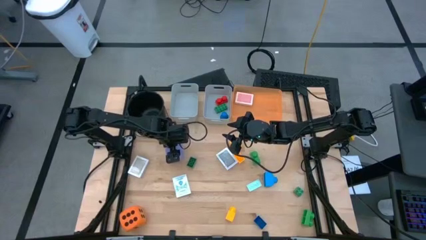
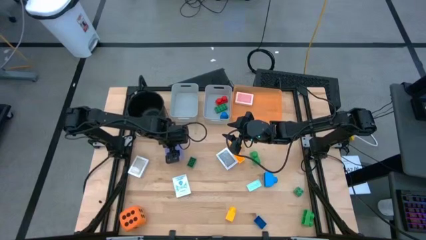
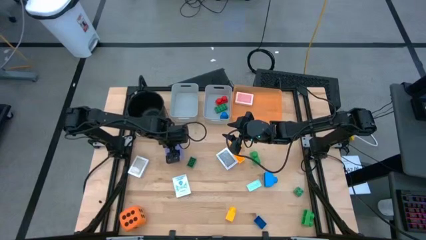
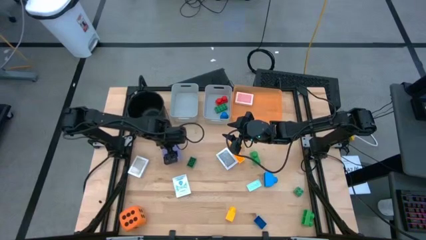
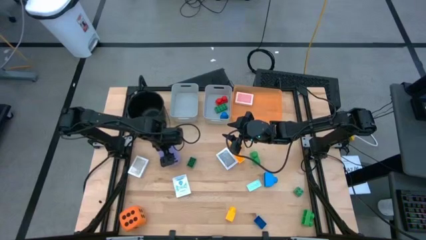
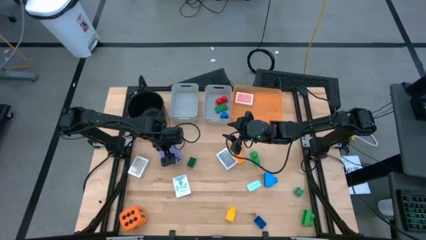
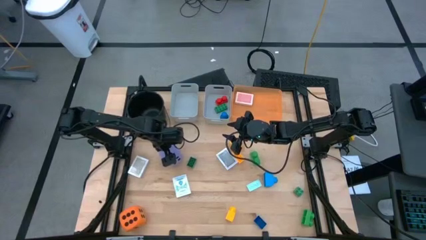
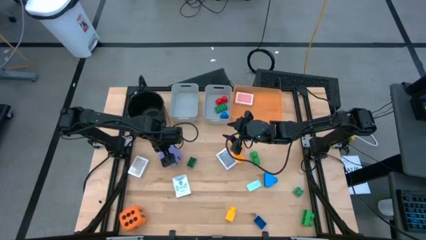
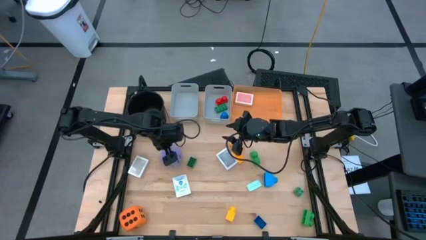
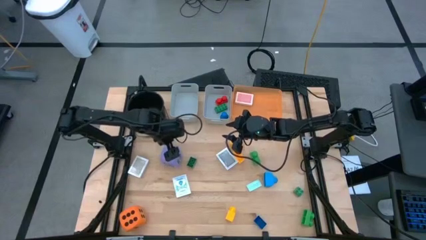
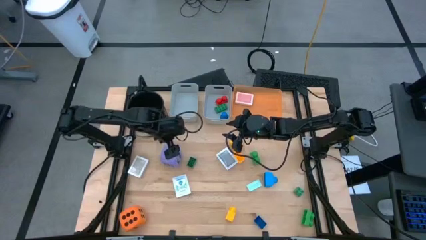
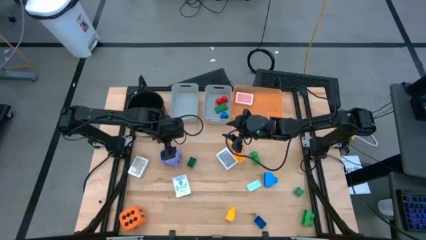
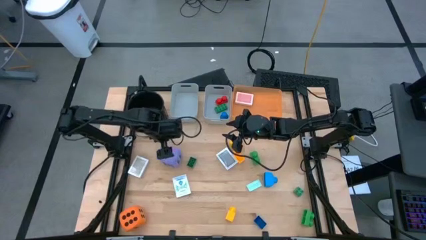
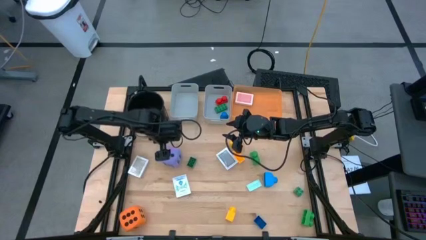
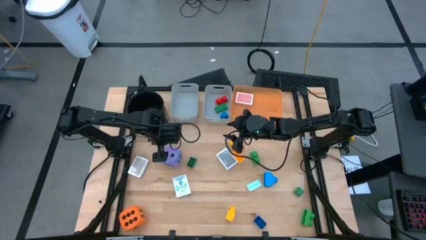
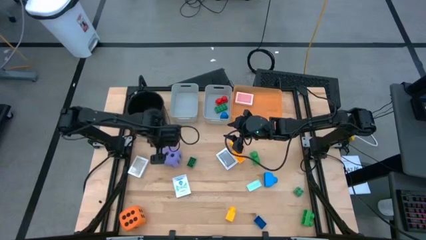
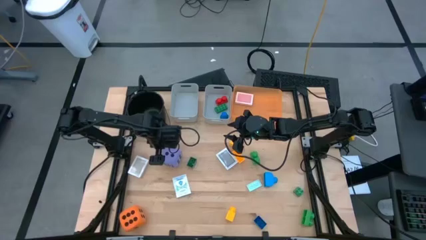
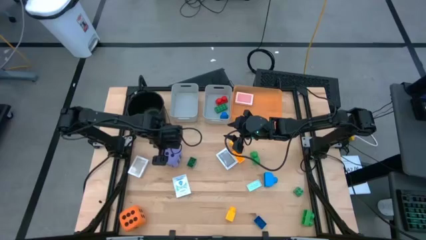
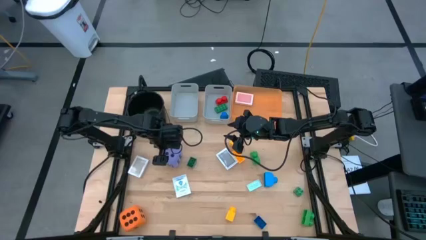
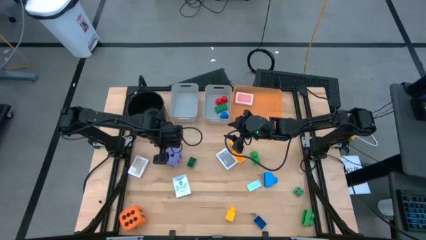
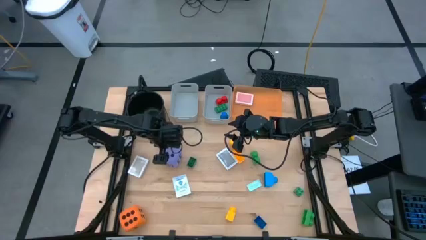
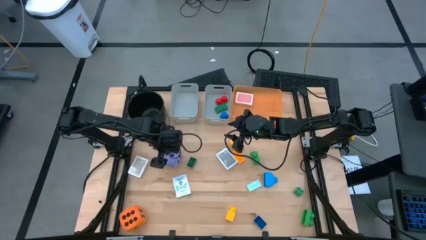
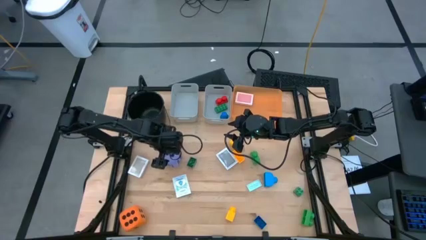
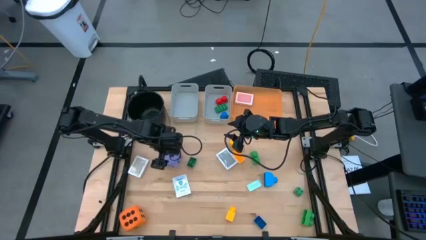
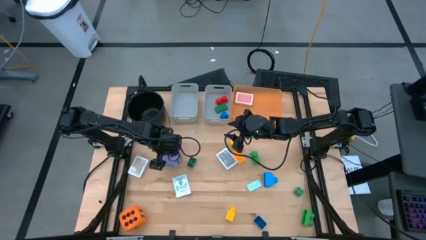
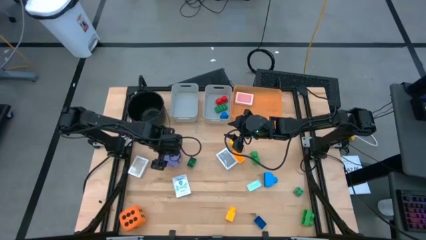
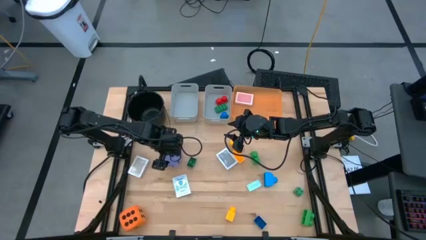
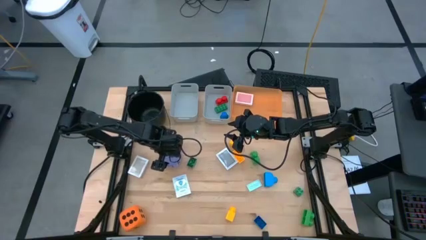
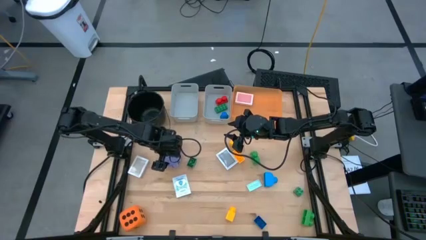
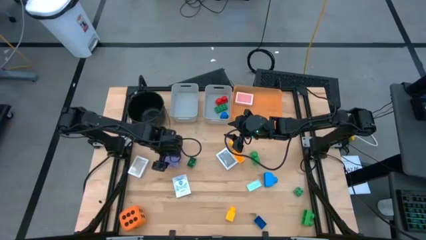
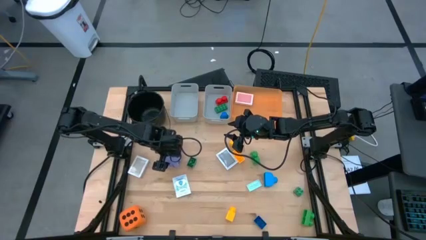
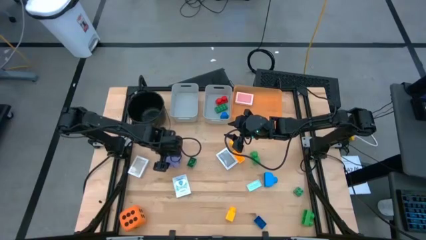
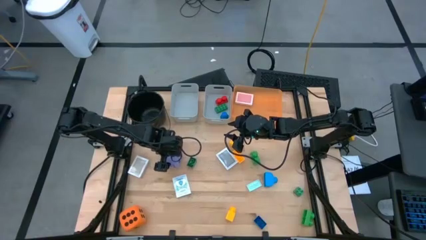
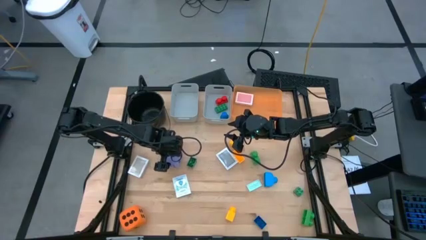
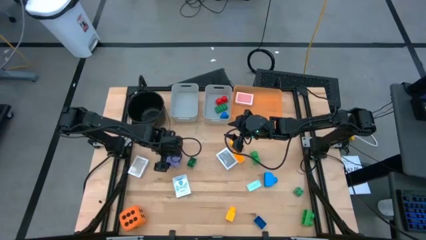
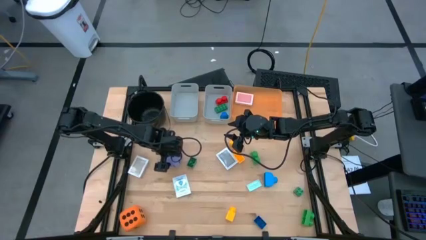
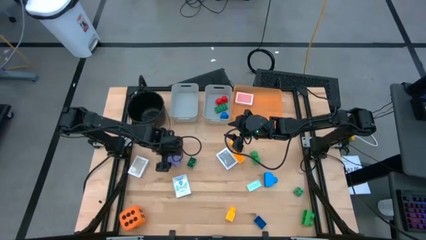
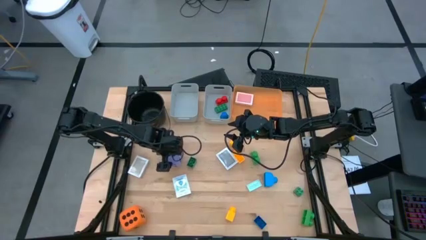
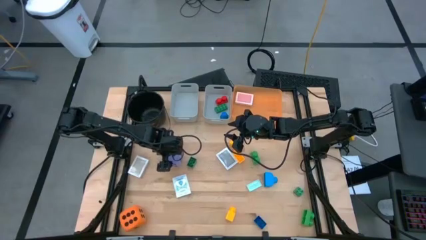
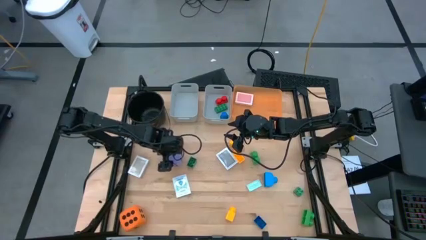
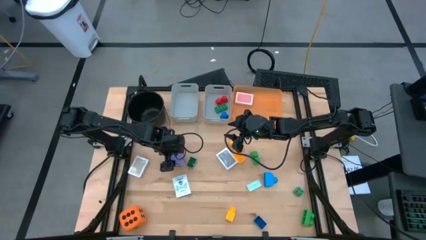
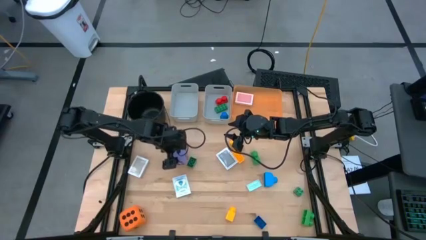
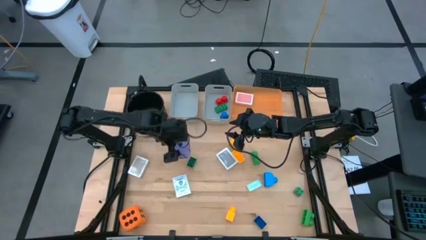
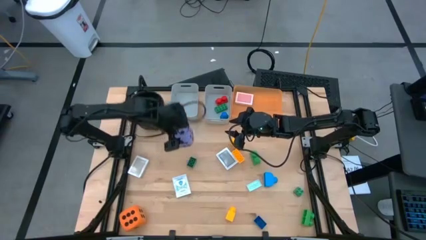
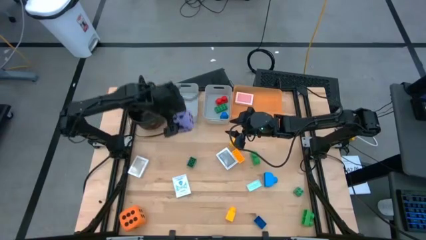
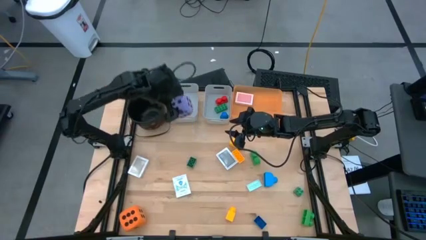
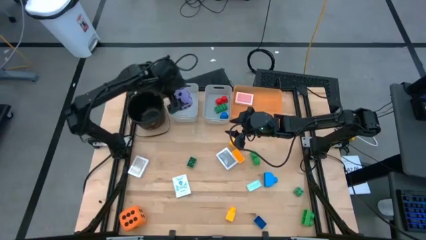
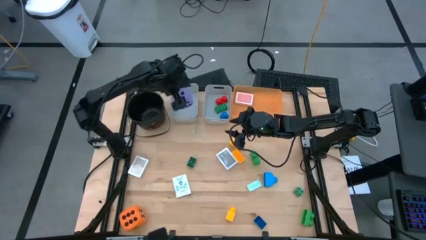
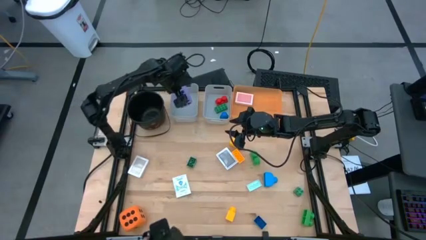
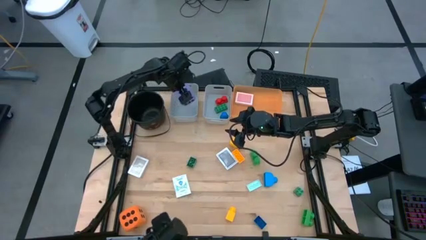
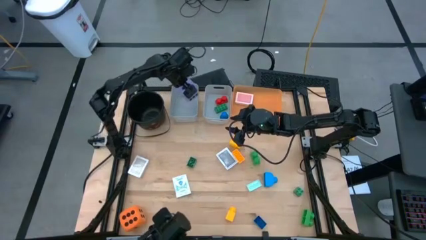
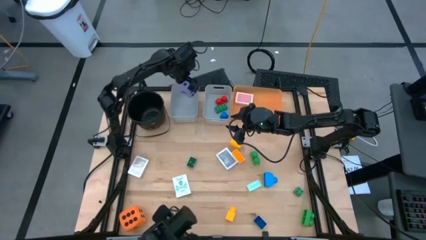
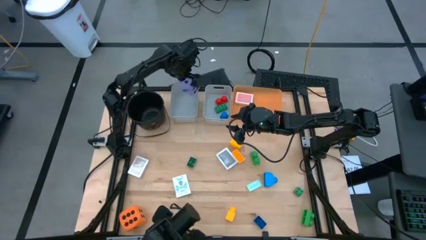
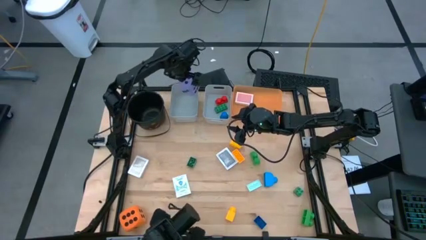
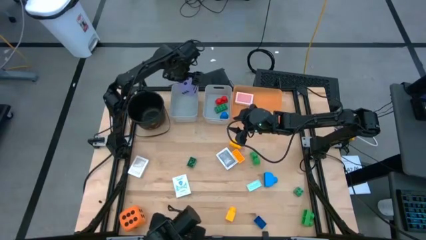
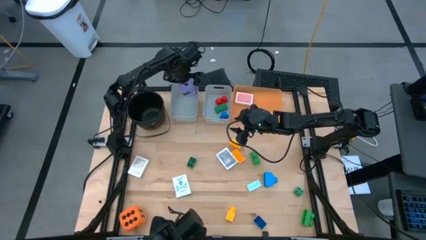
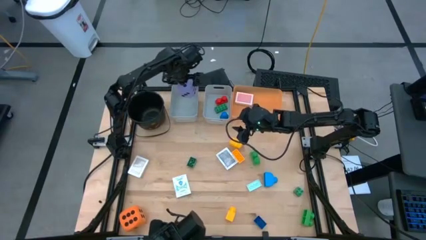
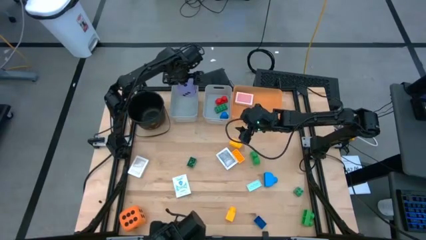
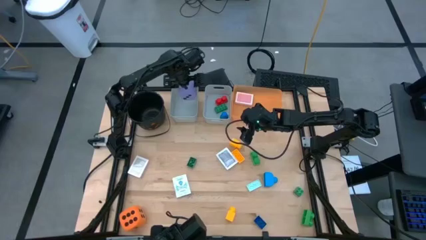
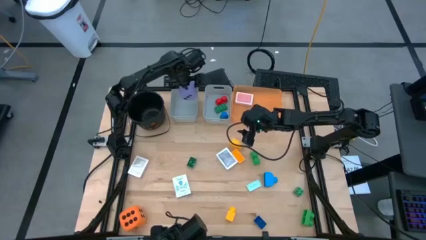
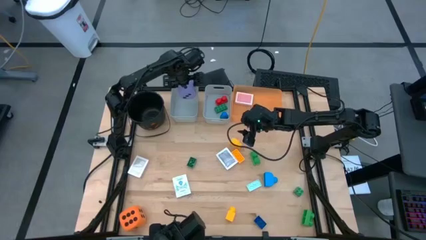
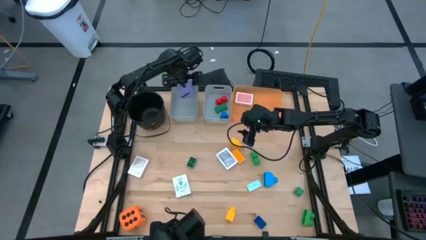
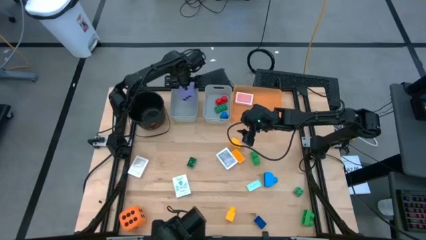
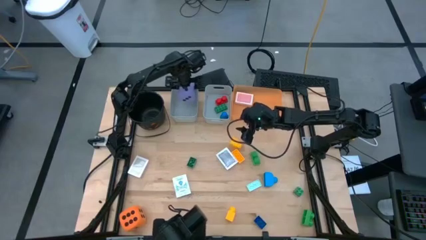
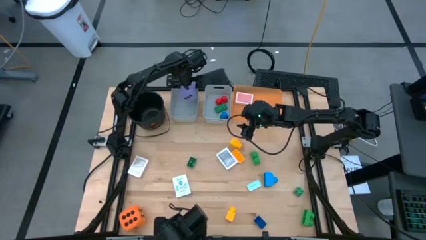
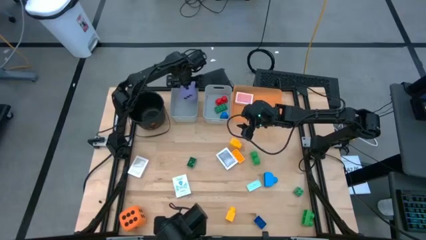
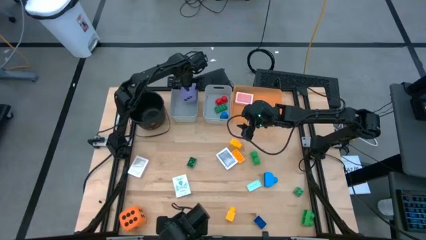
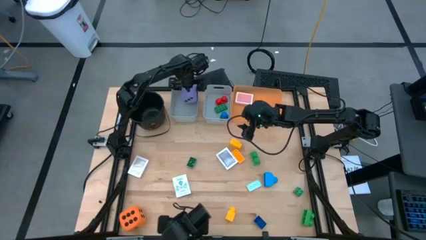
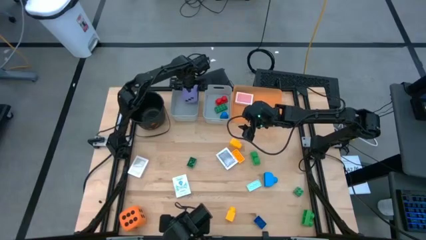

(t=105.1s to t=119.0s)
Task: Pick & Place Toys
Put the purple dice into the left gray bin
